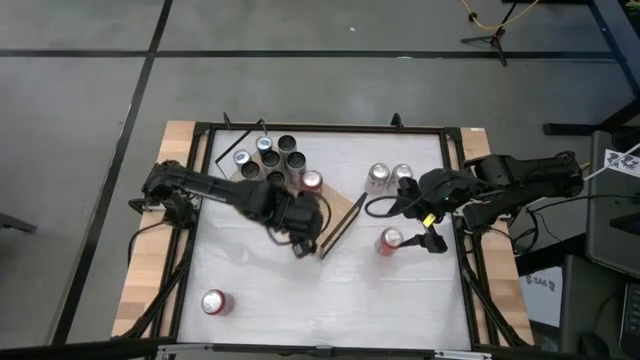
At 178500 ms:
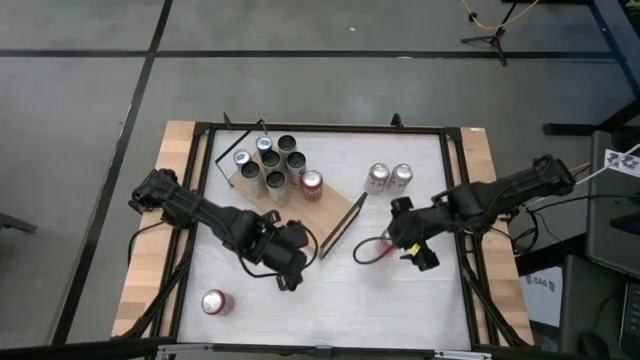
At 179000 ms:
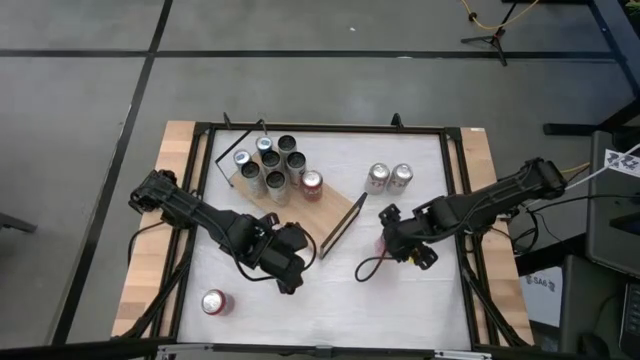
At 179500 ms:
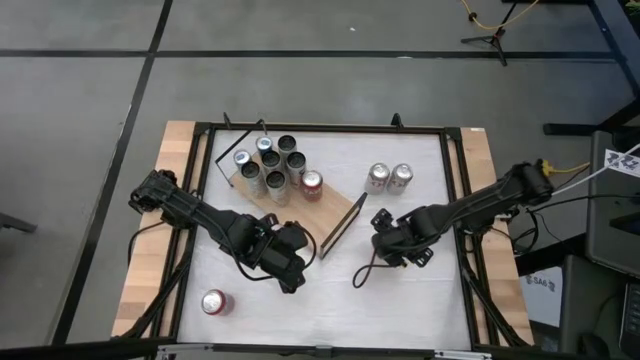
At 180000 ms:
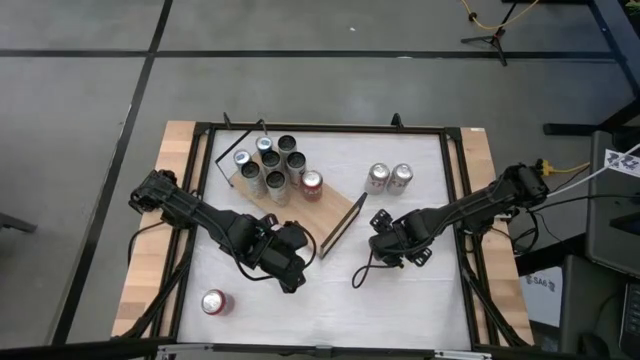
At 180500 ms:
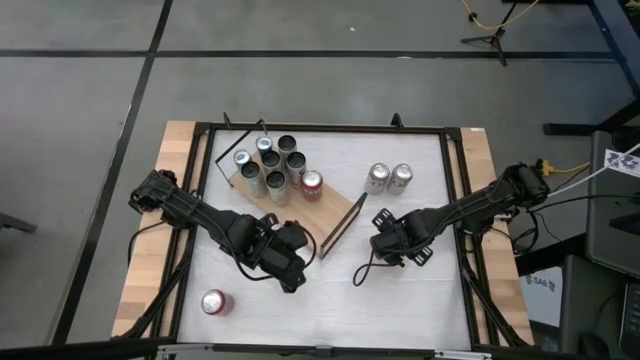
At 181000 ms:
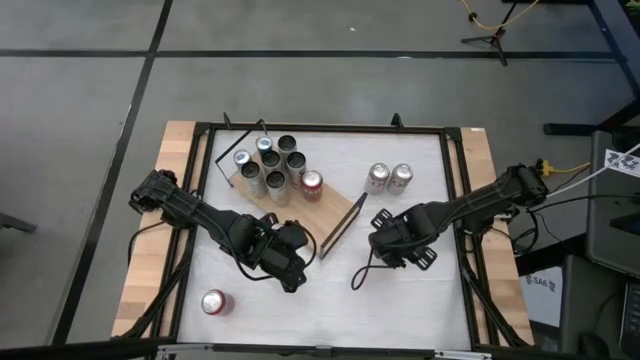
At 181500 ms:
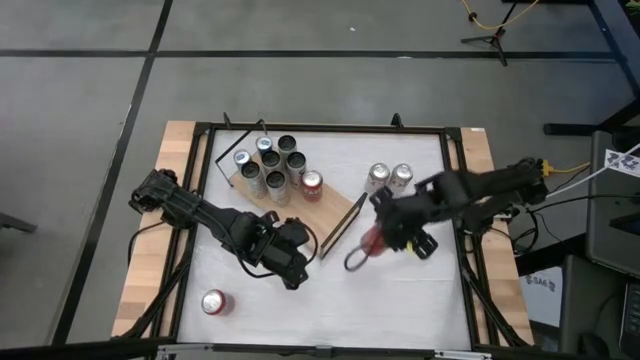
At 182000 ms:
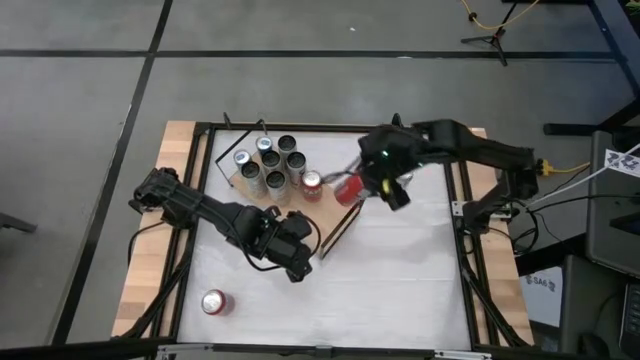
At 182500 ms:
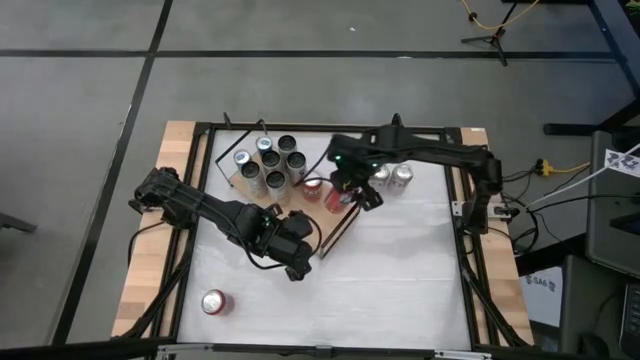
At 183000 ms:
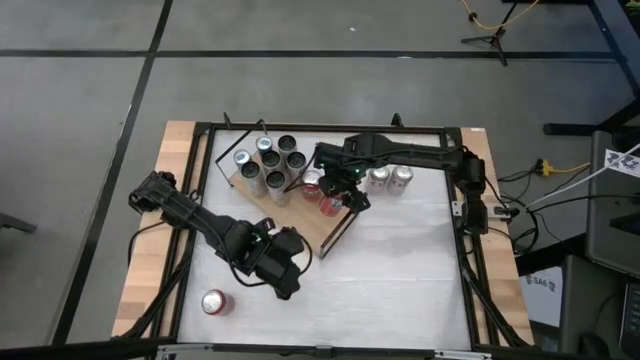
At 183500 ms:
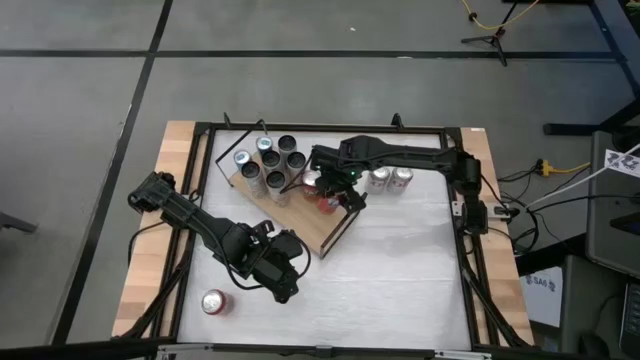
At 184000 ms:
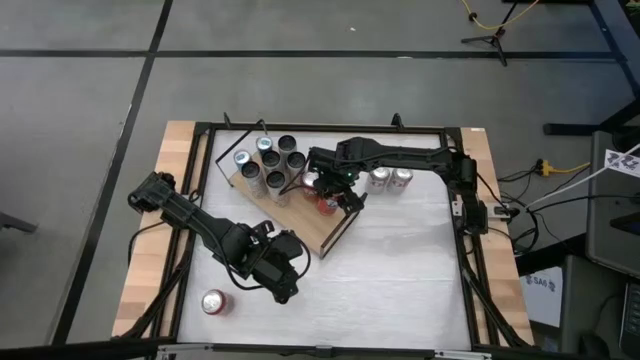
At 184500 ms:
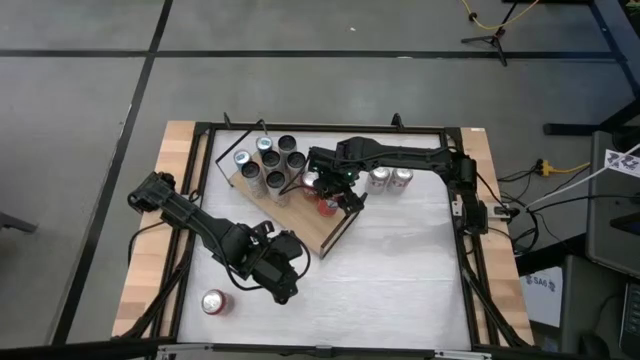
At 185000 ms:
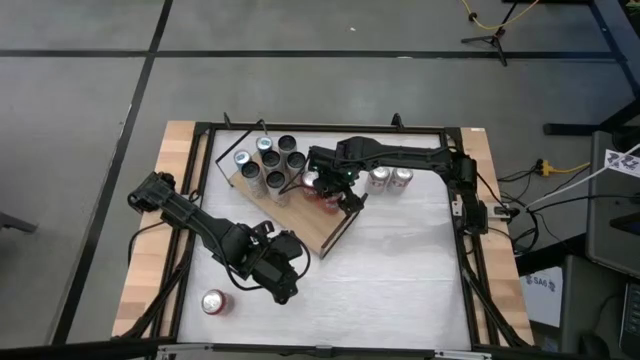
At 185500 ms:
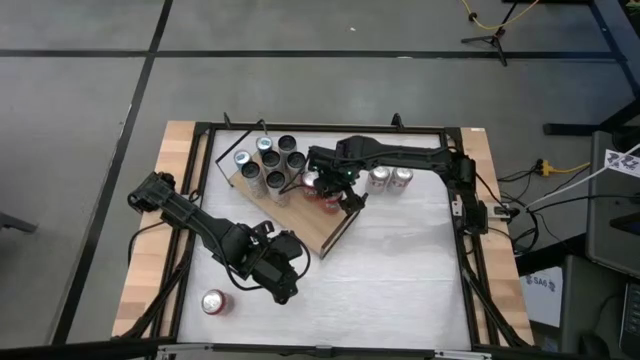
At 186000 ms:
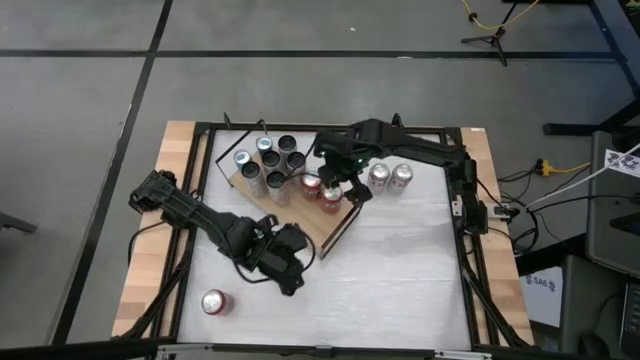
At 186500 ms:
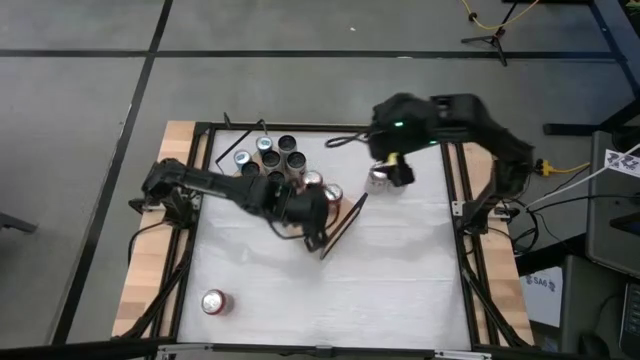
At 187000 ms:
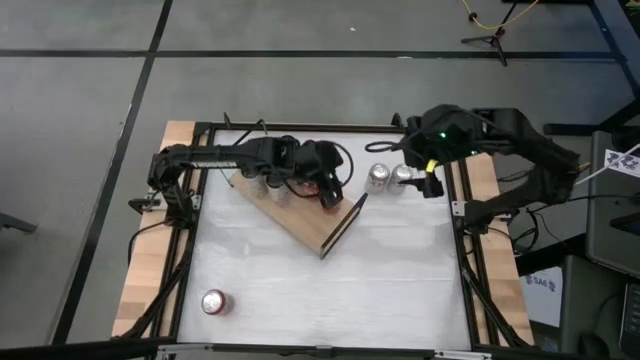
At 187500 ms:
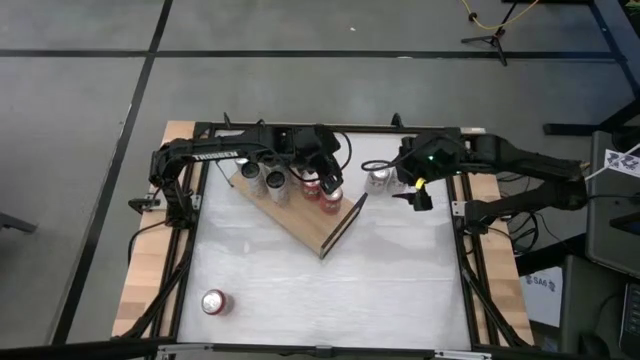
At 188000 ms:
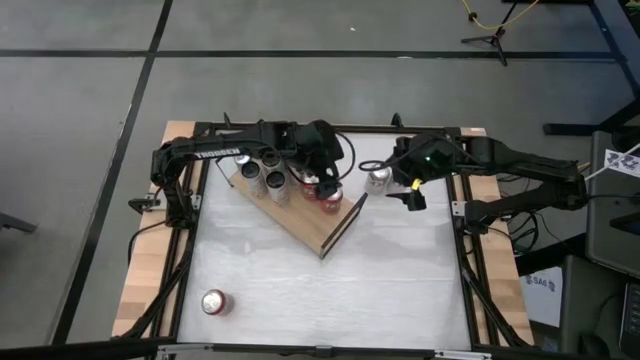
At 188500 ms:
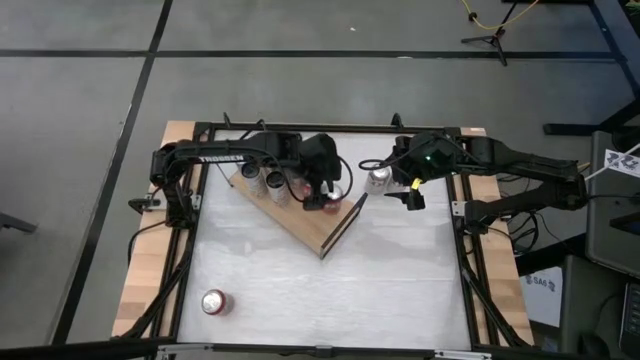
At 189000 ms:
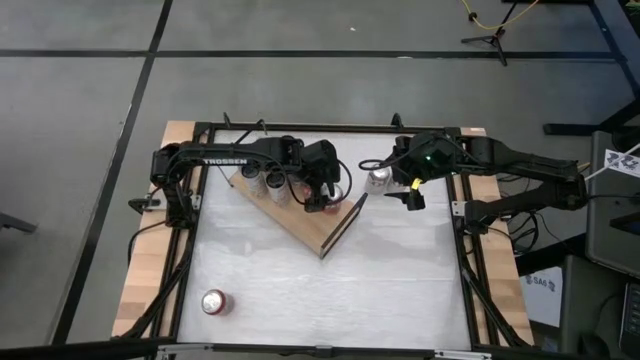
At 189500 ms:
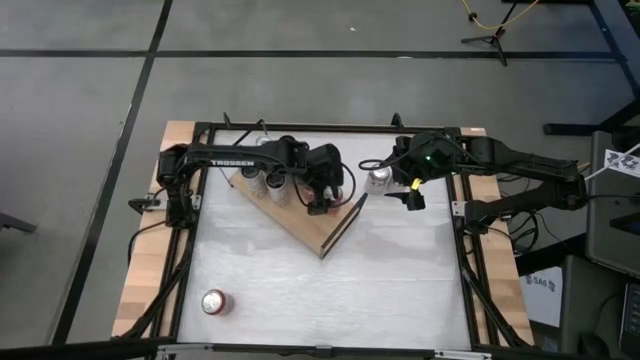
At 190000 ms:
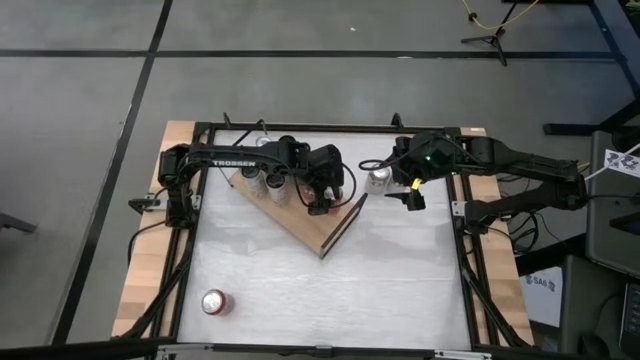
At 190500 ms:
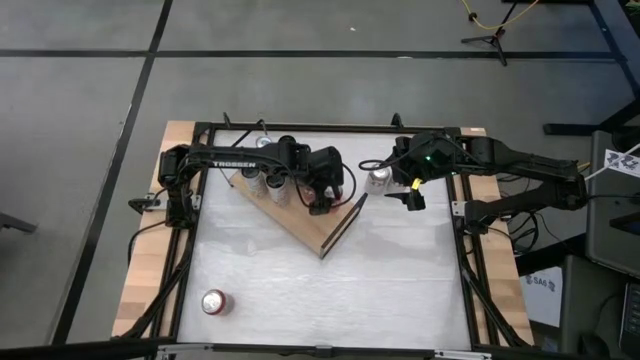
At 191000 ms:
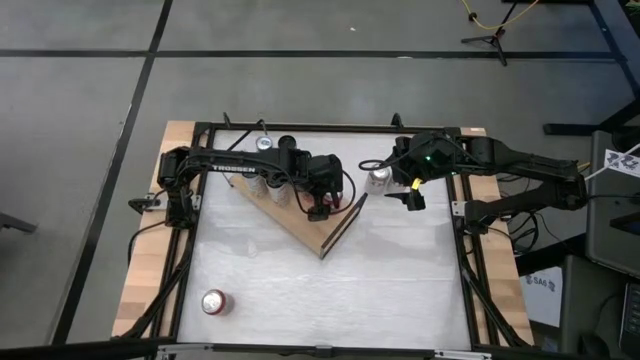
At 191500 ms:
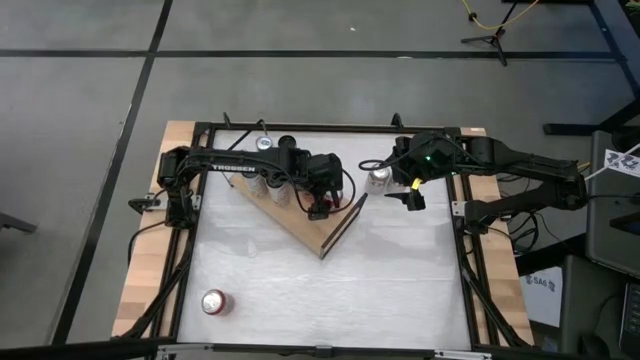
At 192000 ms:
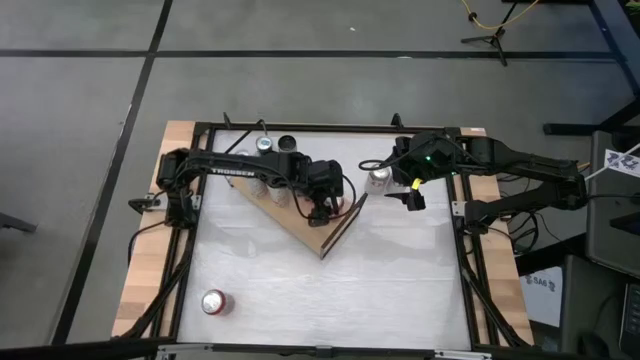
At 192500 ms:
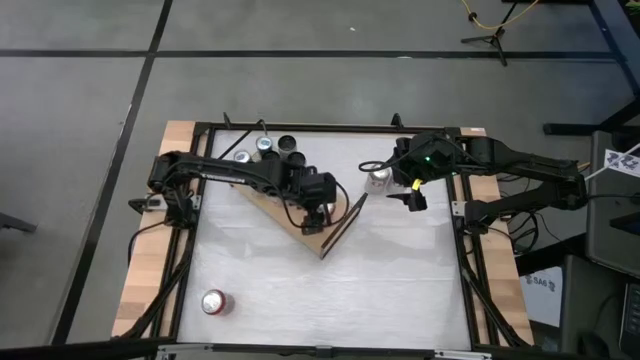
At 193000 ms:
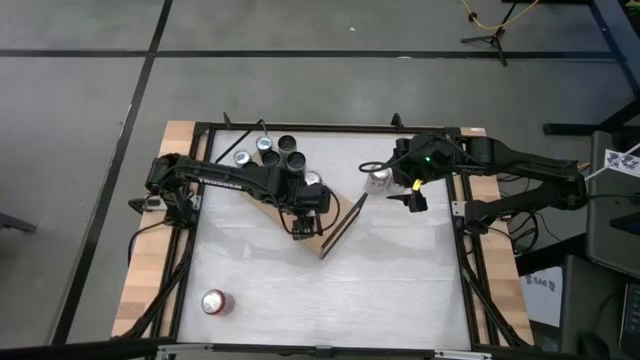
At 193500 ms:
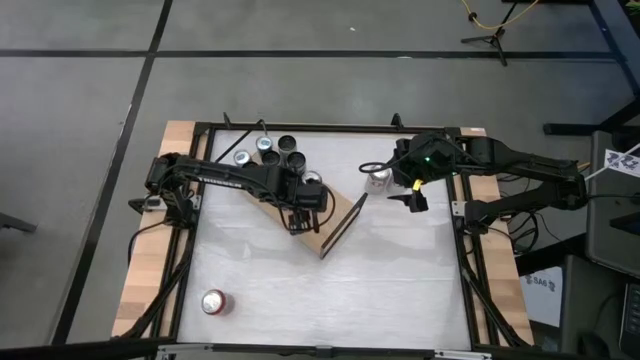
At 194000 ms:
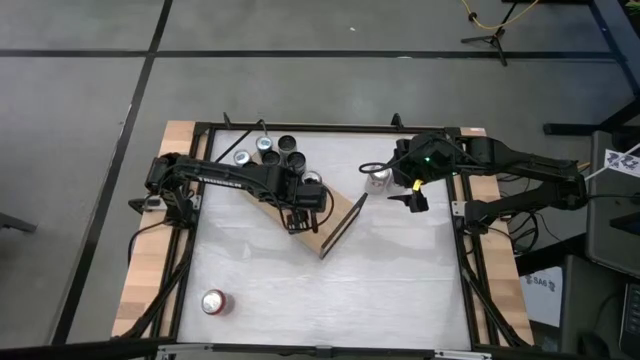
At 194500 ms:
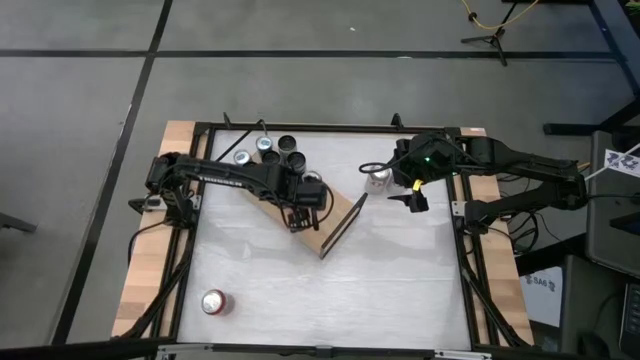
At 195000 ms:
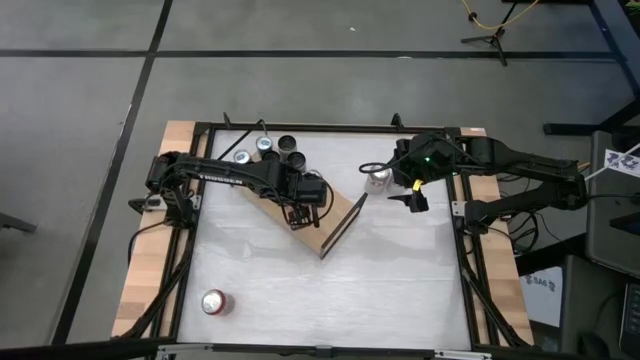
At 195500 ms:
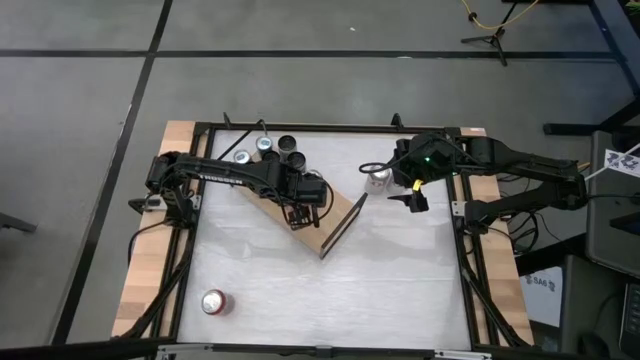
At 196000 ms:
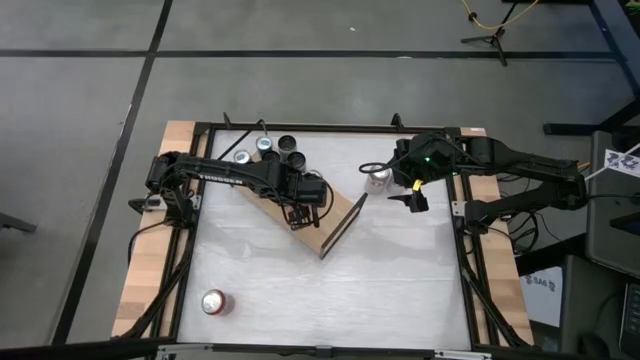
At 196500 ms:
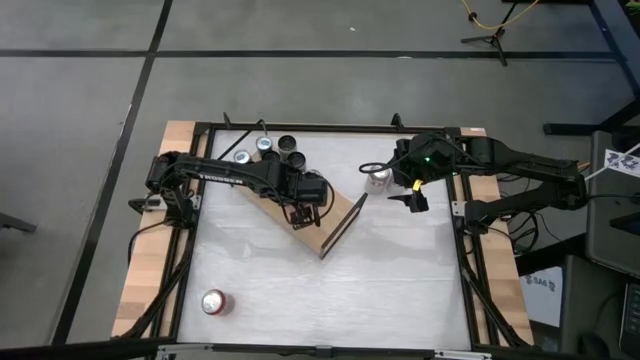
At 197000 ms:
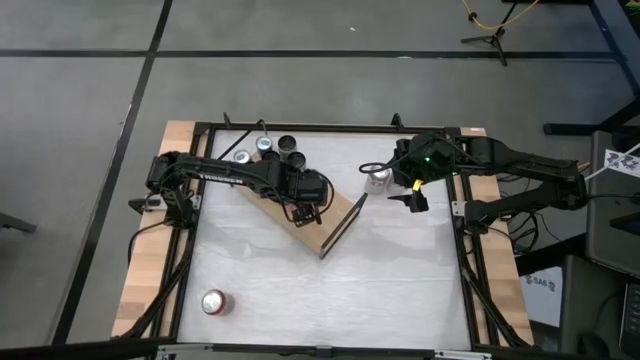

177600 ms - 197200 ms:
Task: Place canned beverage on shelf
Put the right red soda can aligned with the red soda can on the shelf

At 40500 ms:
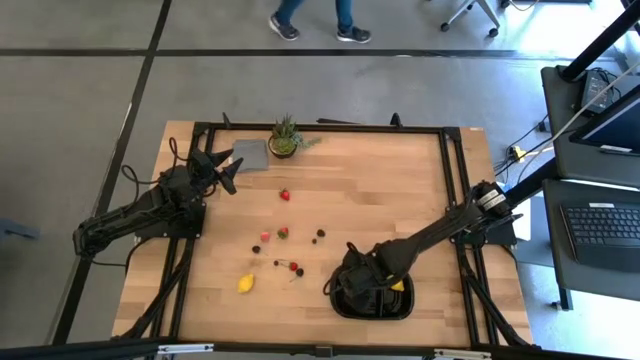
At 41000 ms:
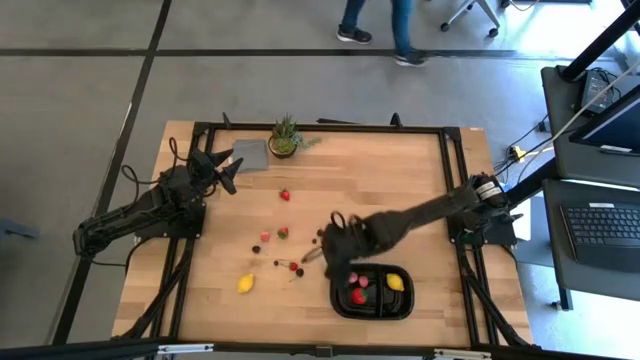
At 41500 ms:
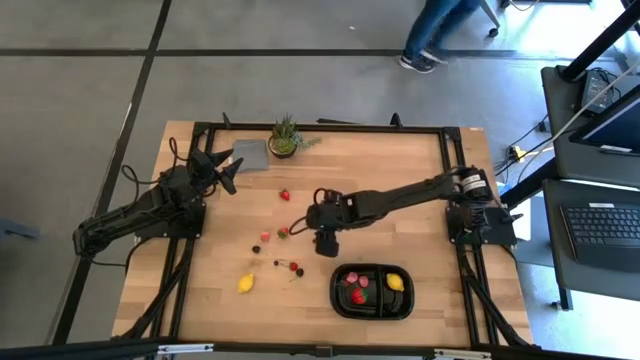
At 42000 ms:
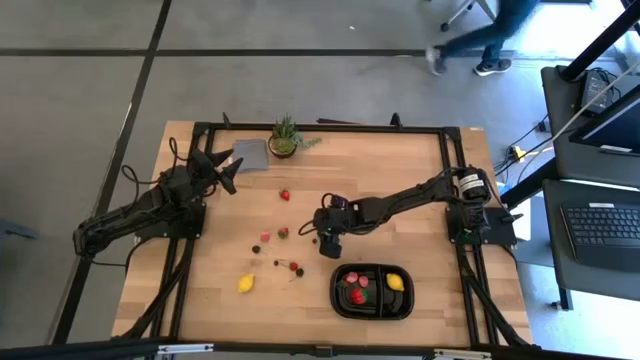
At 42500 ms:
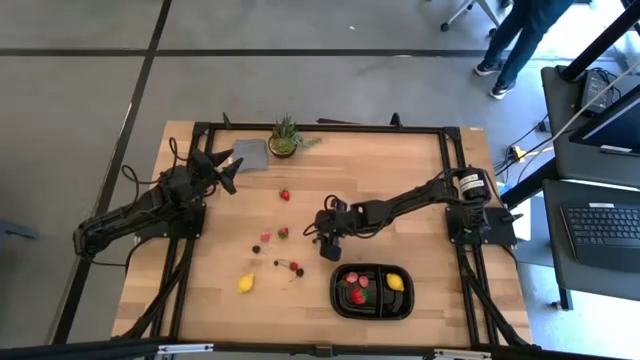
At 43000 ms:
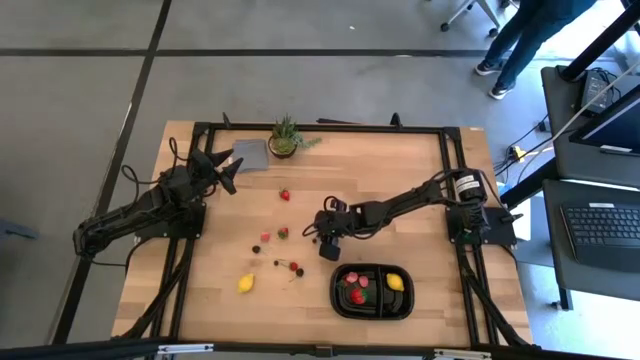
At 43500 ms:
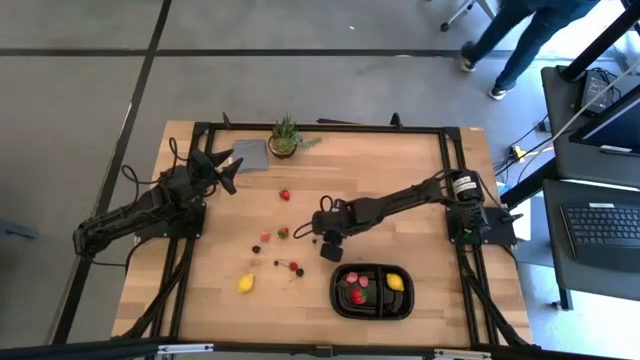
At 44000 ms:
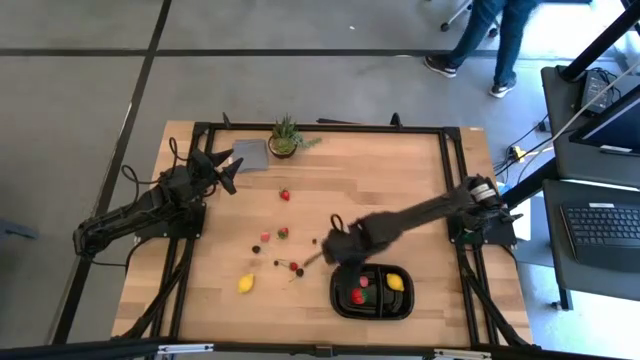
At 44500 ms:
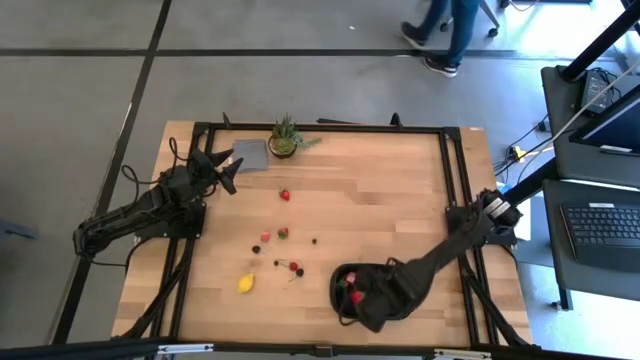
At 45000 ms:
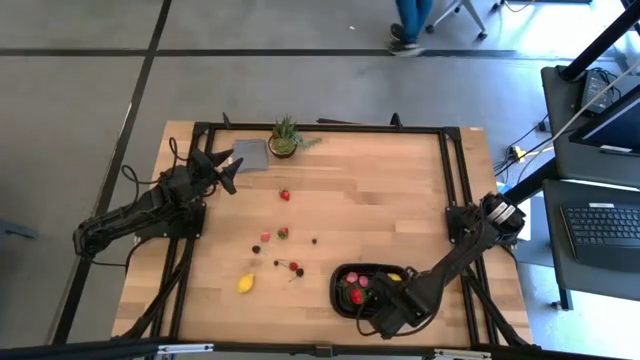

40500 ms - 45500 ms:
Task: Pick and placing Produce into tupperware
Put the black blackberry into the black bin
